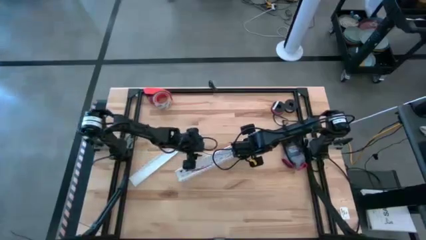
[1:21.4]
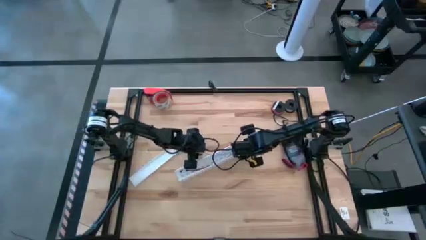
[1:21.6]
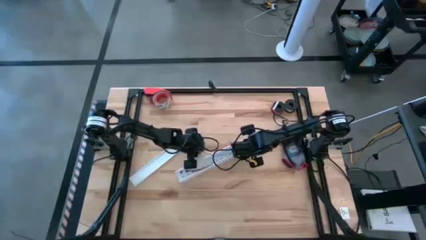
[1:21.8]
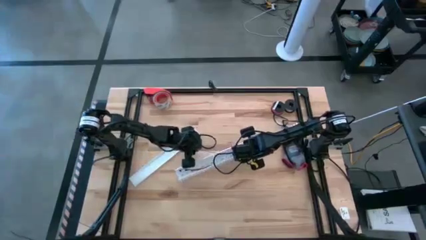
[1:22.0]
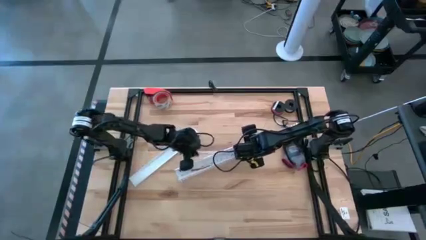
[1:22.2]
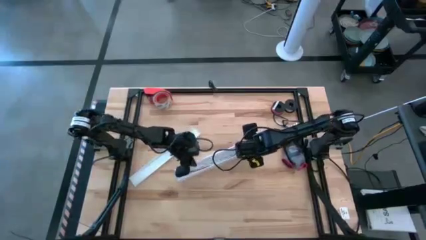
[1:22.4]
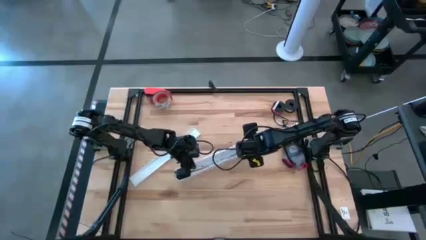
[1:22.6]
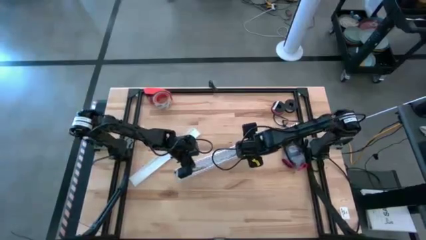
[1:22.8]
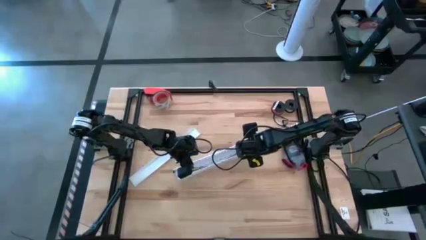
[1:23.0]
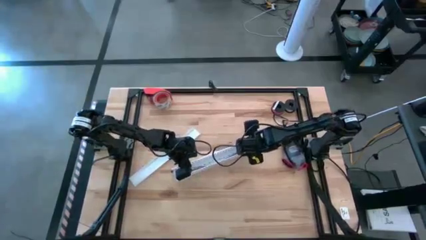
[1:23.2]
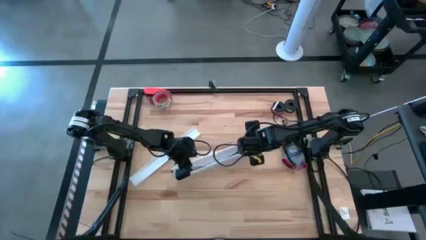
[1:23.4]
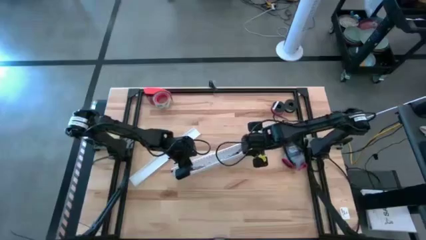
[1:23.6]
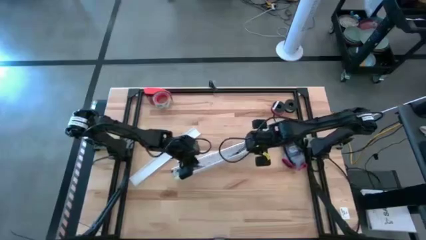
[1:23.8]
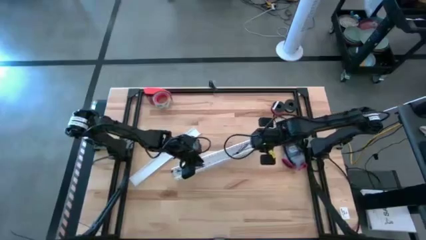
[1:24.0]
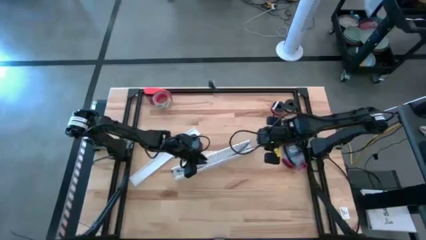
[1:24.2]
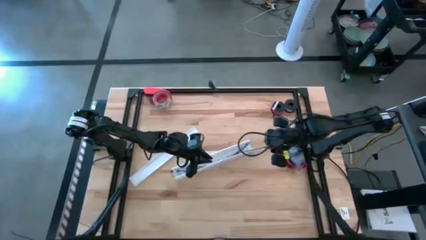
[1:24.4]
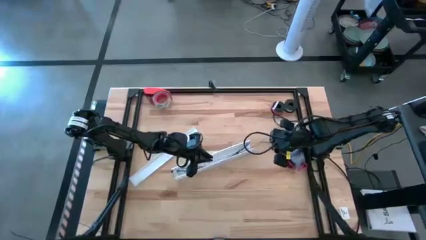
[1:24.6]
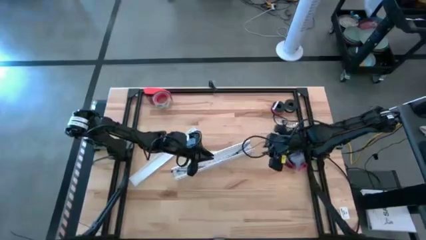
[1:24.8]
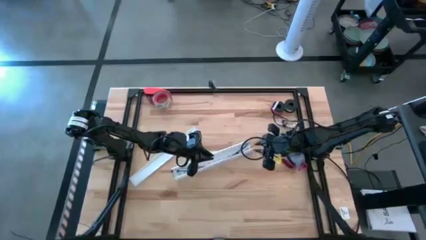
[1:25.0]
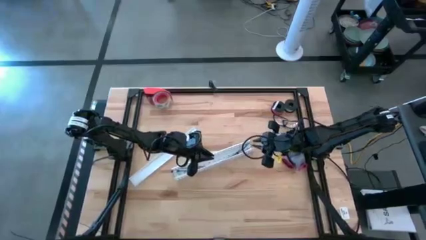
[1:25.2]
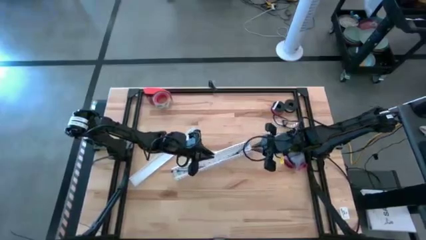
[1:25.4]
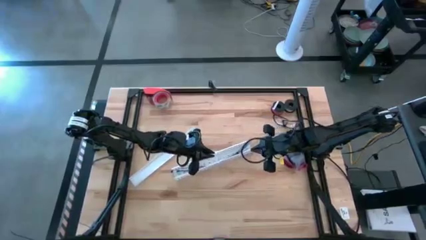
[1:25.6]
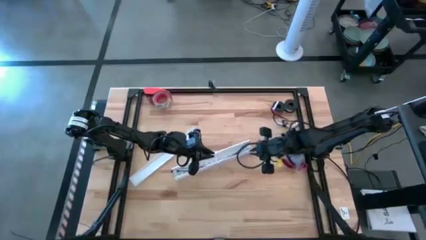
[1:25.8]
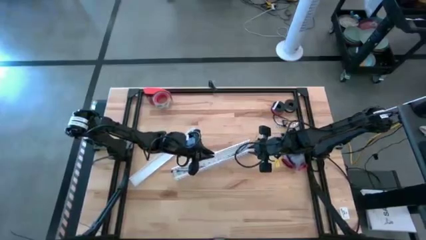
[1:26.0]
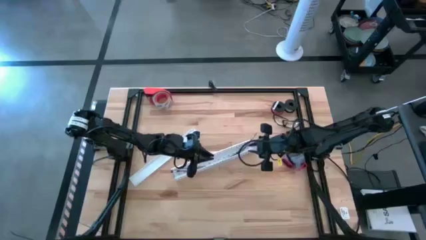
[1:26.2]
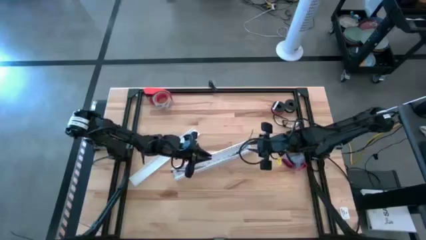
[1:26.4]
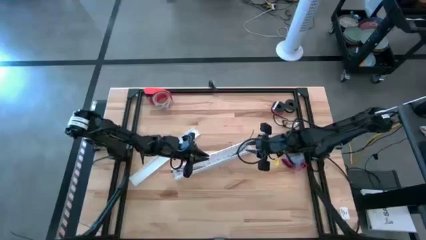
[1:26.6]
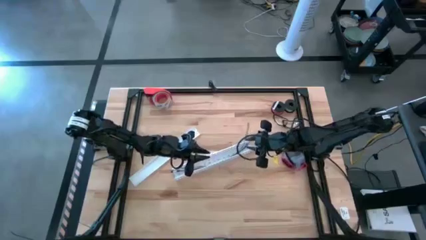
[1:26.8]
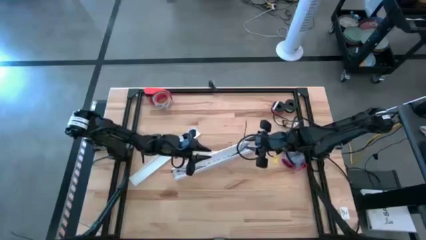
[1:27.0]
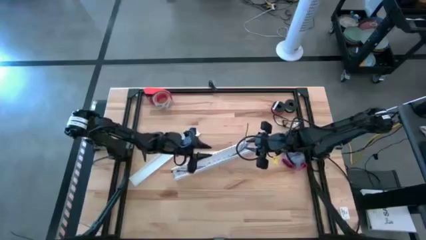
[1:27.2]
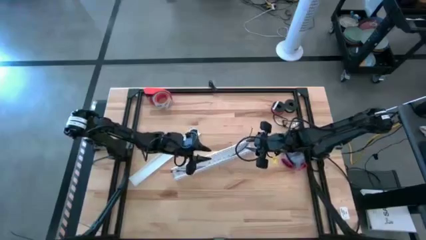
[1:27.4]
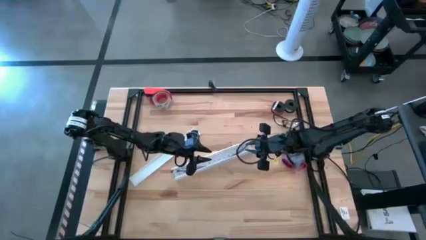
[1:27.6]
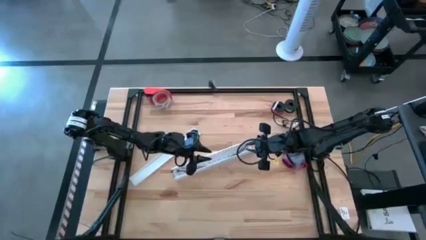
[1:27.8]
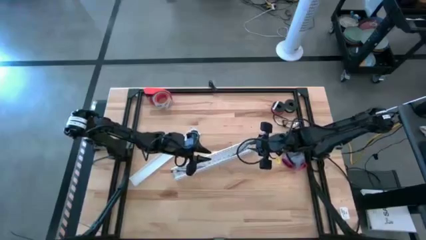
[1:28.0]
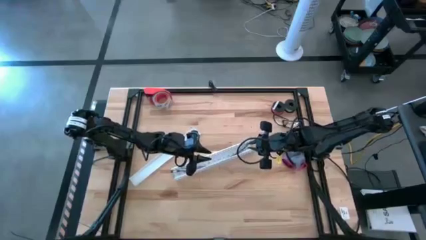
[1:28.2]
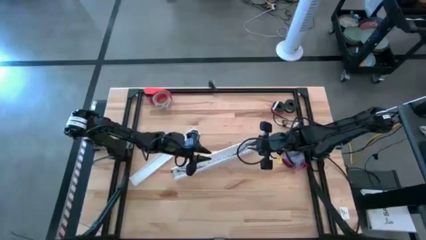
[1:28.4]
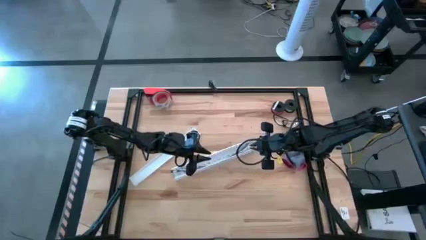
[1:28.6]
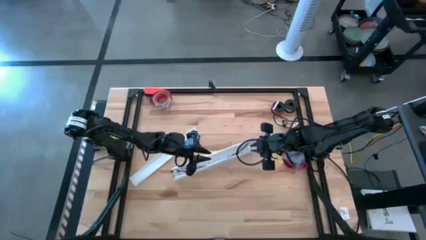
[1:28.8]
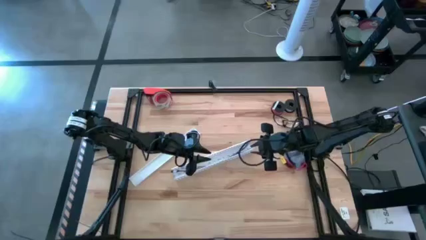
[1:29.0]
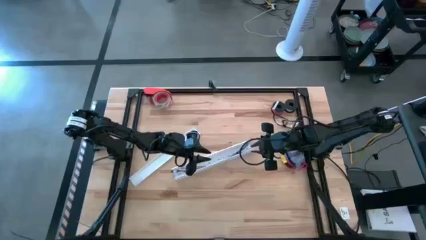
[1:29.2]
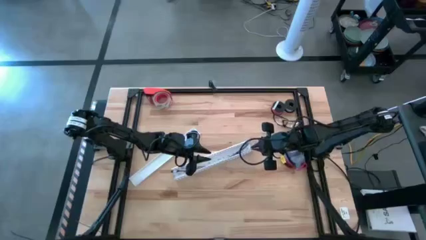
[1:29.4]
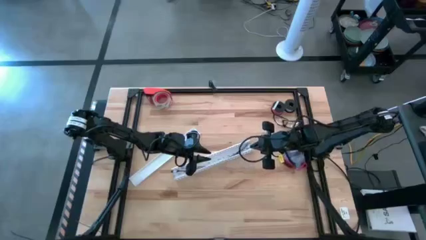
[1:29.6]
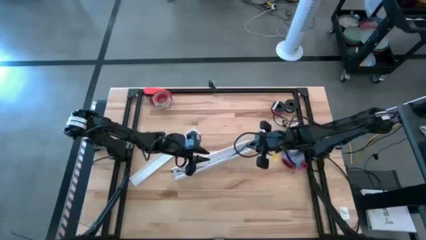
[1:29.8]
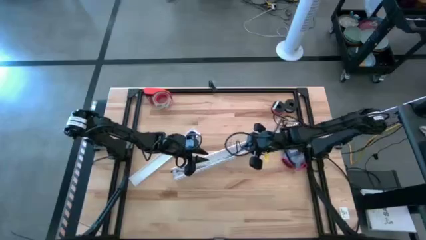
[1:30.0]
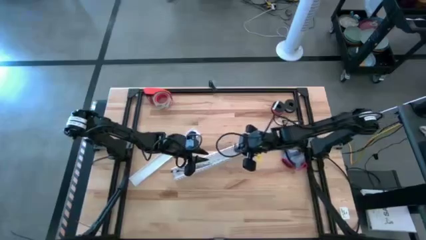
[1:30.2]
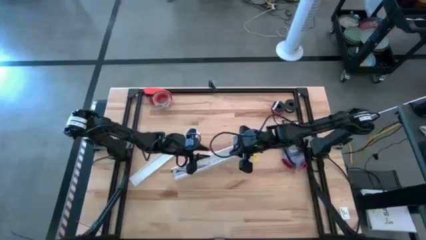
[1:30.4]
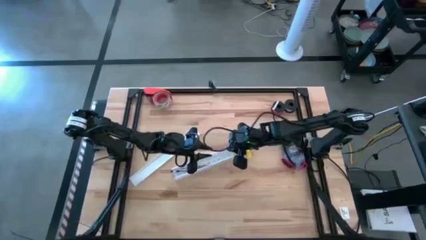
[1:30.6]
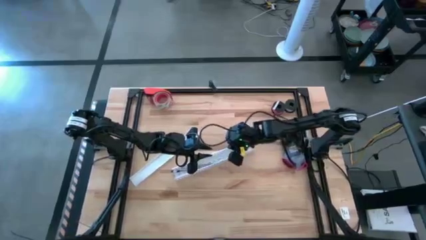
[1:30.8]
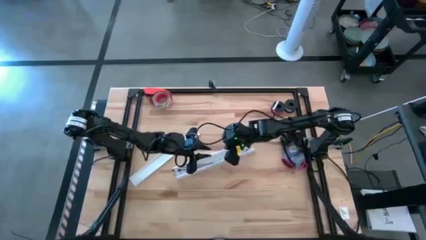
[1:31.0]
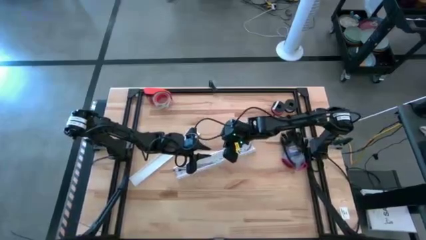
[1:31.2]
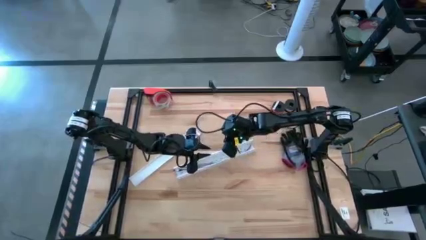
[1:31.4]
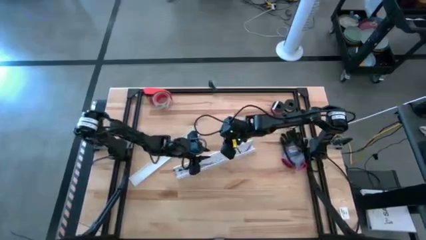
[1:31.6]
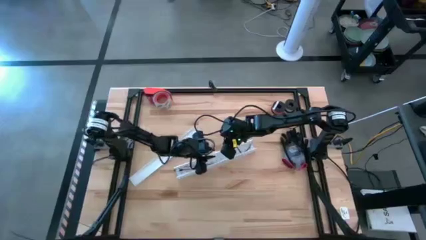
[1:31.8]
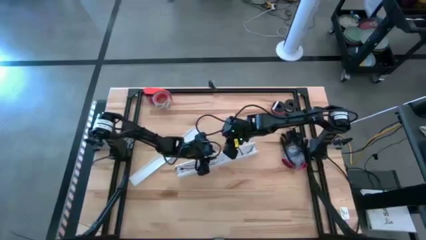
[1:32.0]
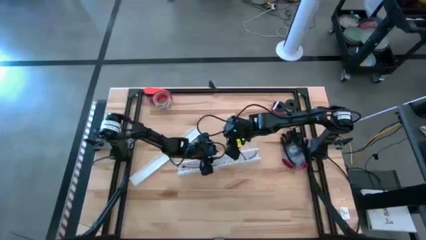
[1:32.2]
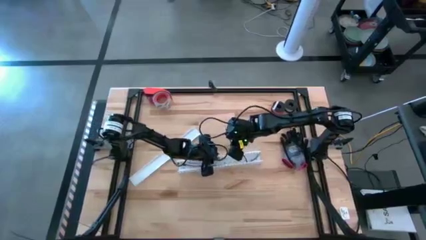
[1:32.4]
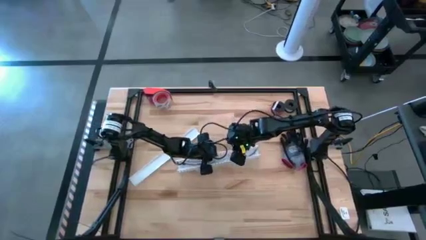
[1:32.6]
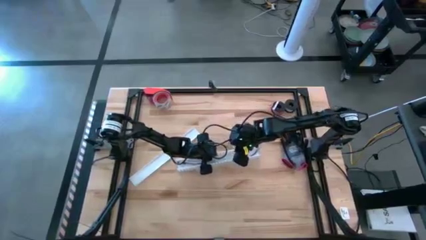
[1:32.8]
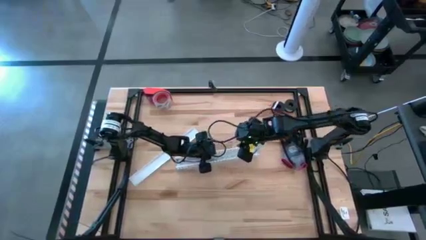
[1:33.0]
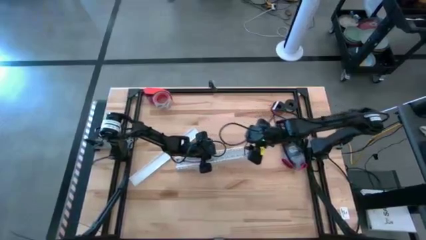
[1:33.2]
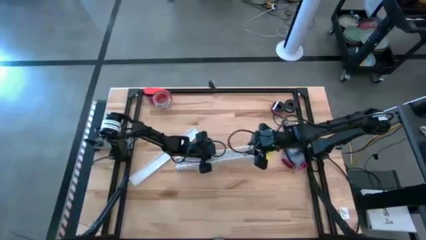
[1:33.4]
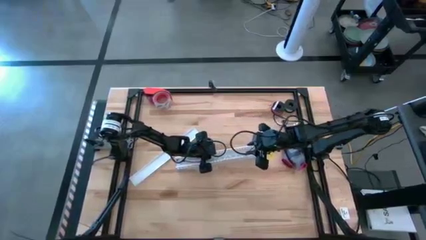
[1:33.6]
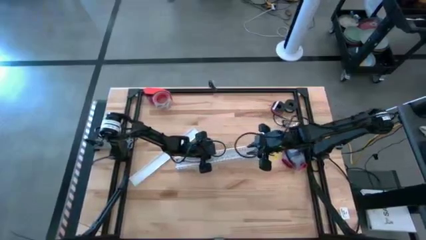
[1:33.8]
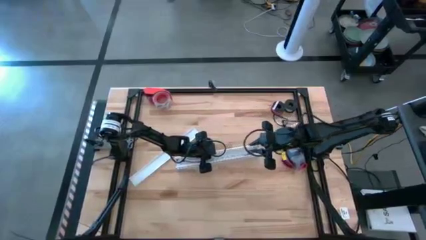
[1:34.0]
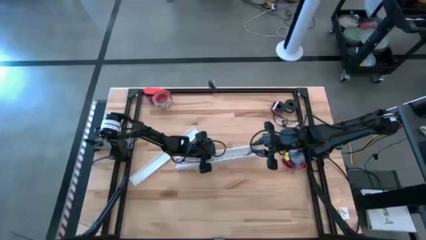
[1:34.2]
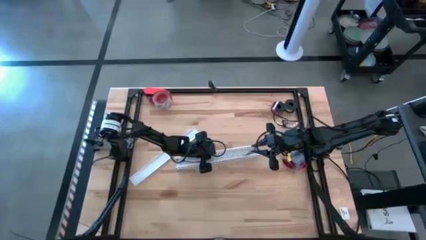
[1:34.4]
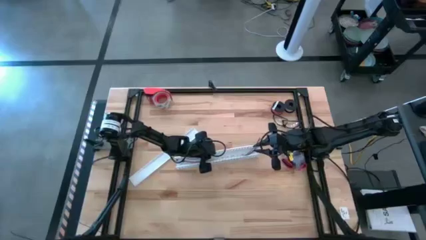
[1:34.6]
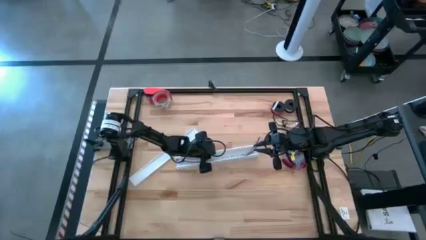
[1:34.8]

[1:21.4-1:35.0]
Task: Ziptie cables
Put the zip-tied cables into the white cable duct

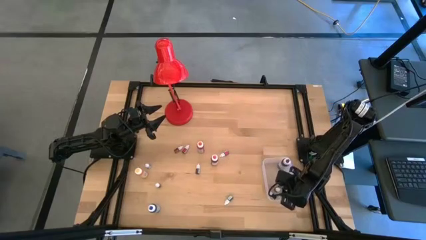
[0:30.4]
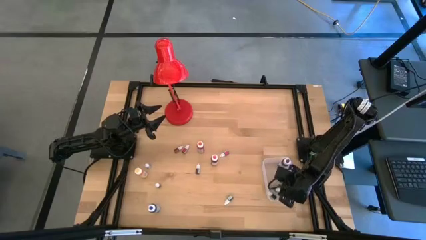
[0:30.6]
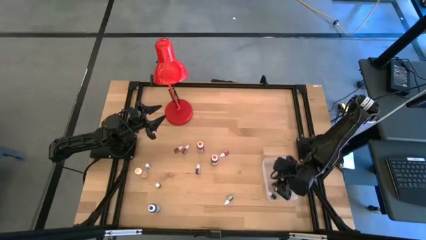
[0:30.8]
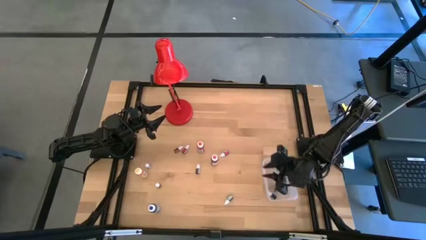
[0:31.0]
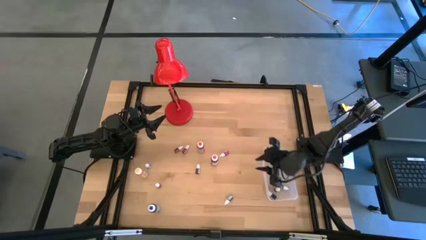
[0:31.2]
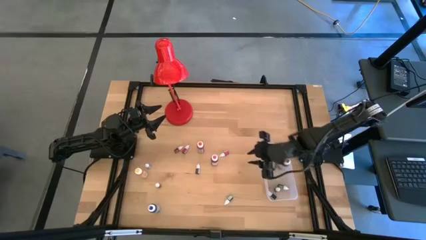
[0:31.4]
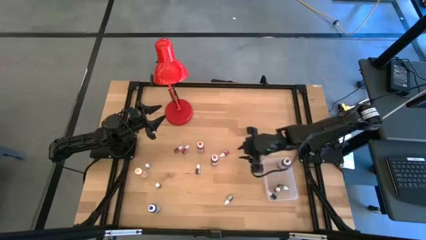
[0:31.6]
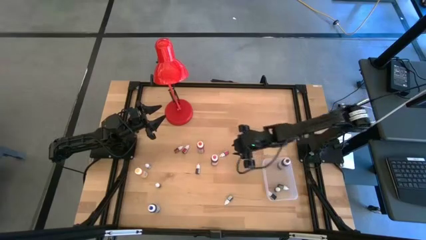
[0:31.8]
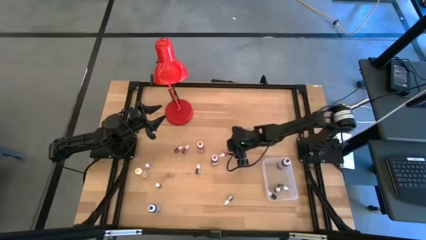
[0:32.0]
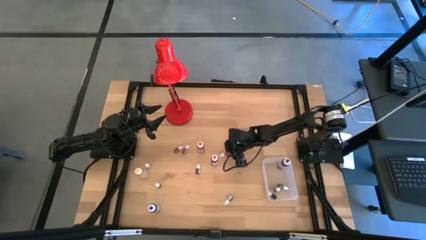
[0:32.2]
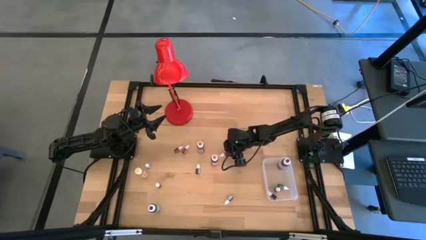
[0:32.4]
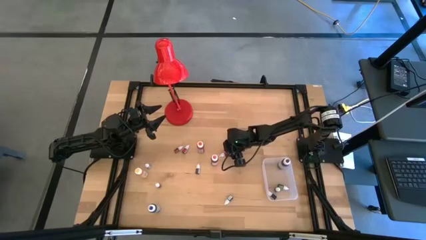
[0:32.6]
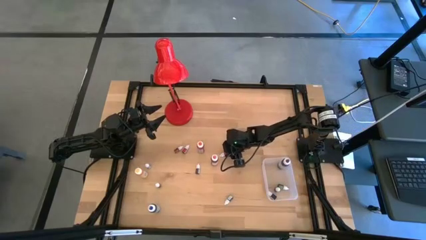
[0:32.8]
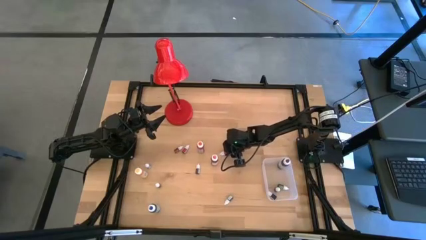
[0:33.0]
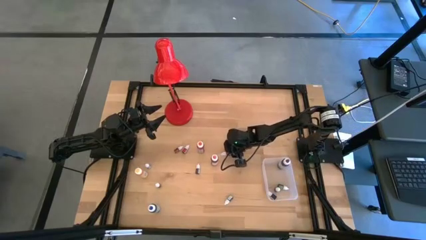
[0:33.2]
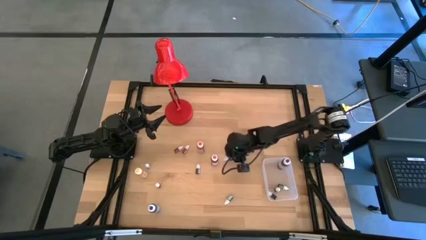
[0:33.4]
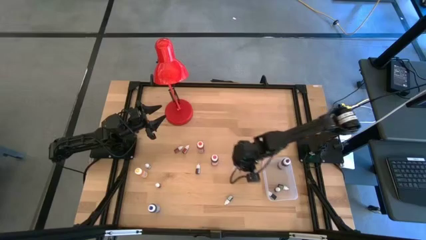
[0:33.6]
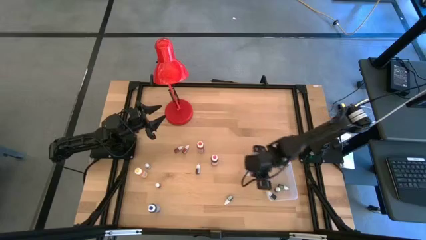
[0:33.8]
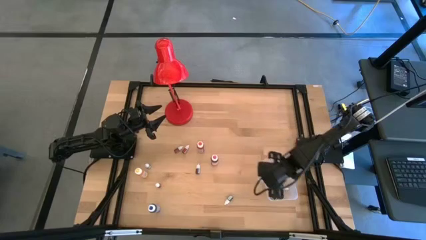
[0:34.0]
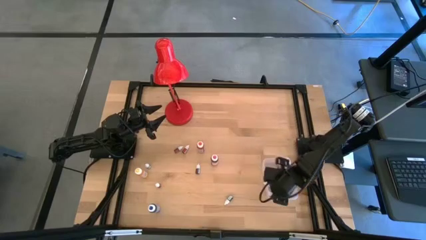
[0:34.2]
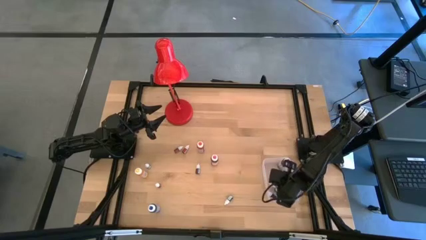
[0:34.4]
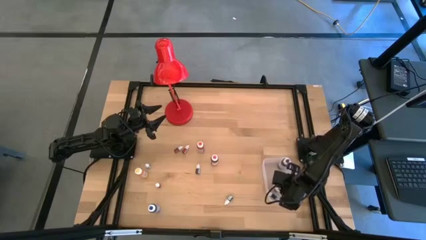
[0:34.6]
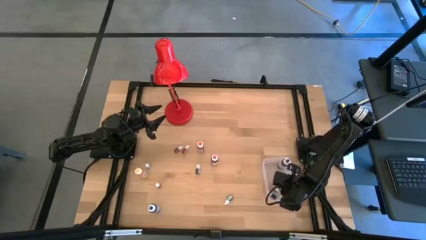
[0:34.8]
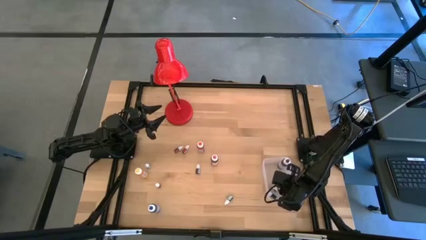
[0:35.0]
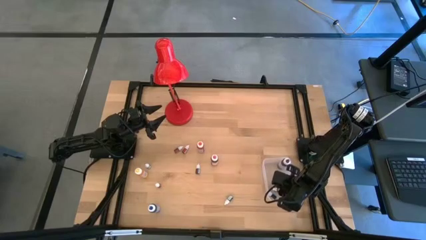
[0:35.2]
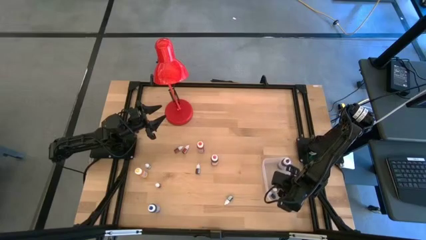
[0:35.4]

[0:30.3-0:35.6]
Task: Pick & Place food coloring
Put the right small red bottle into the transparent container
